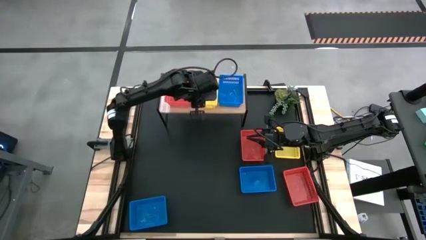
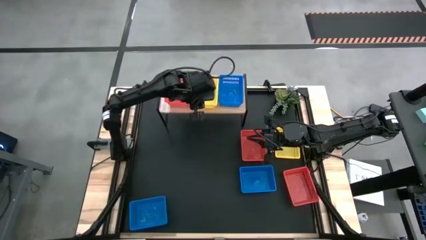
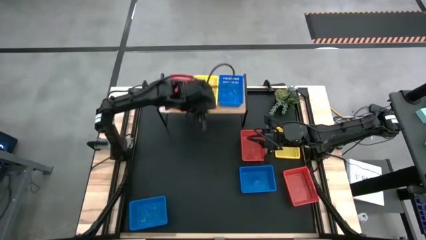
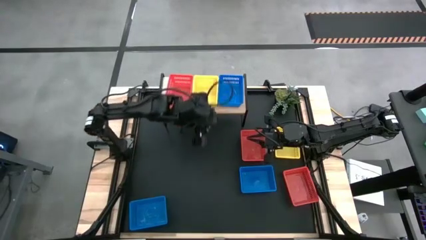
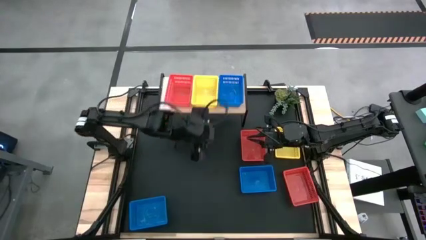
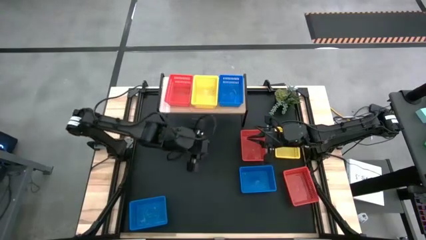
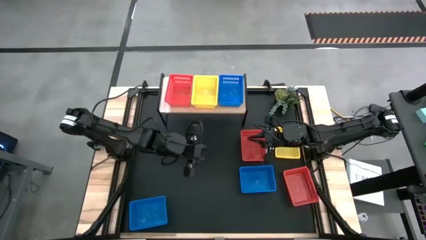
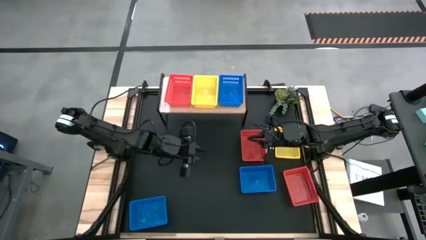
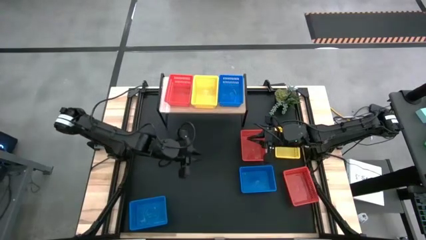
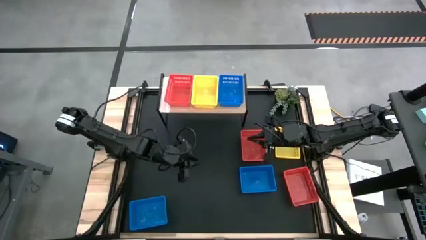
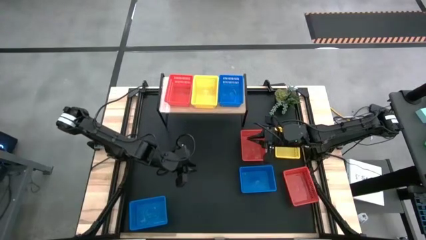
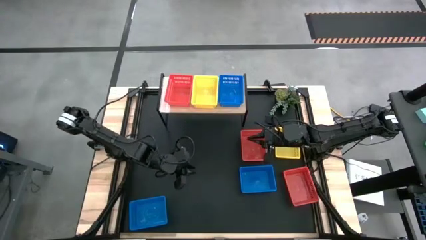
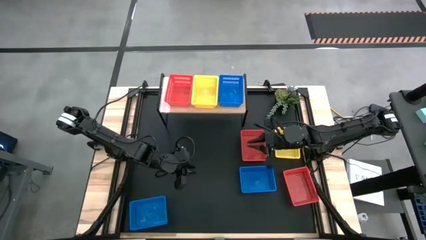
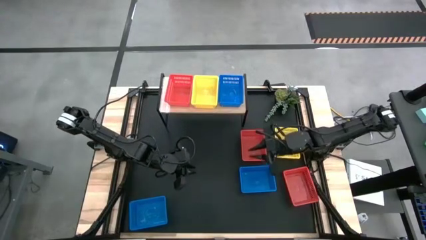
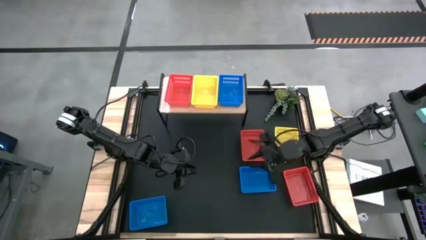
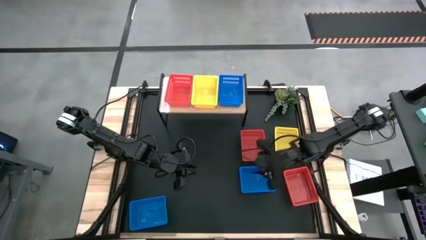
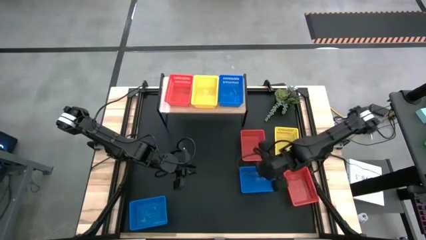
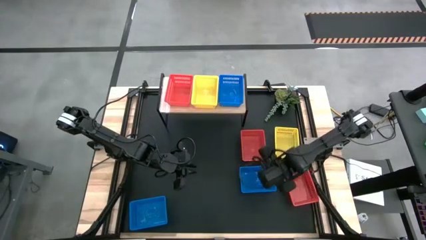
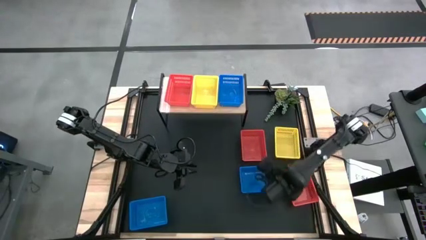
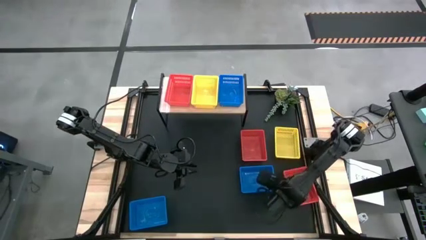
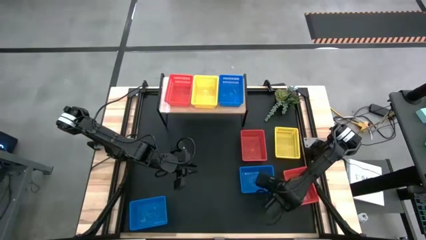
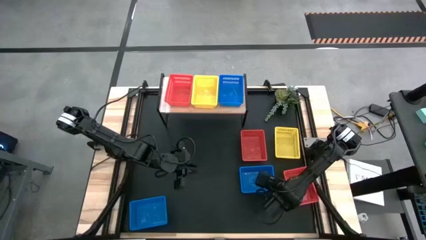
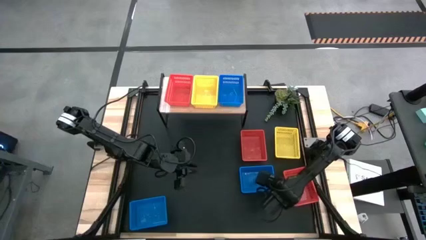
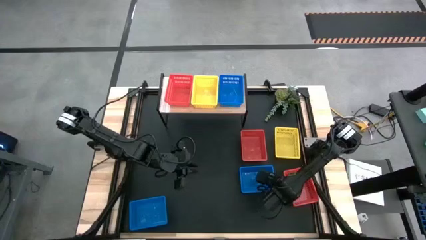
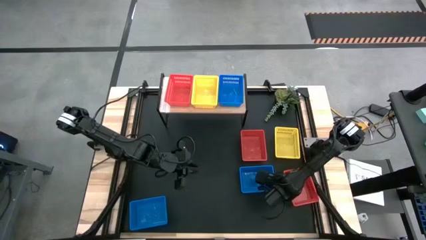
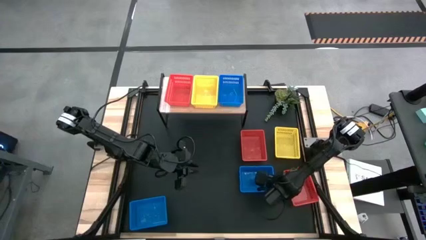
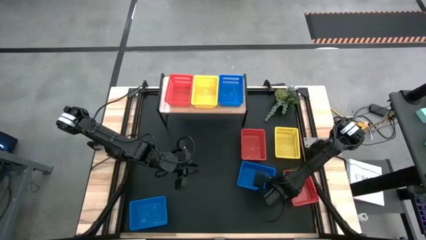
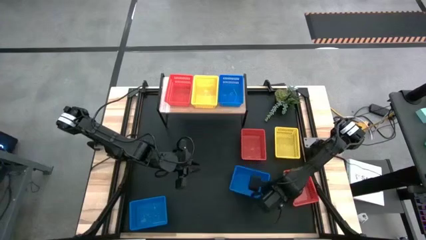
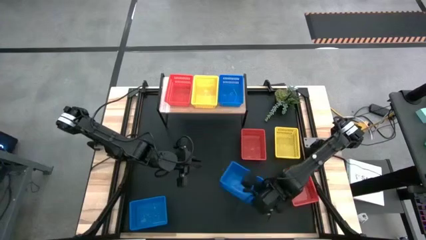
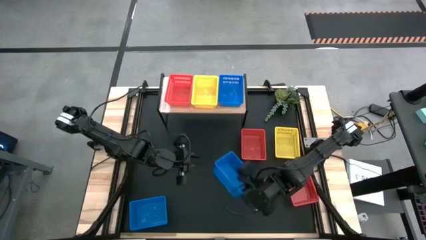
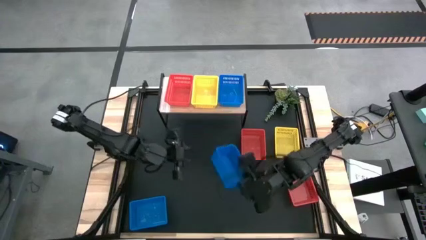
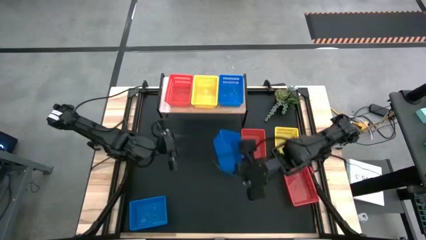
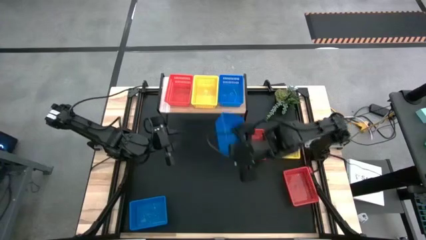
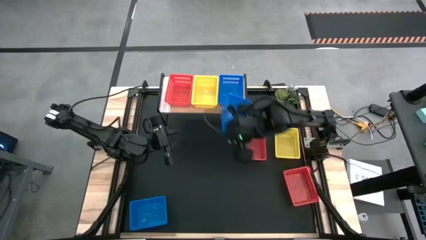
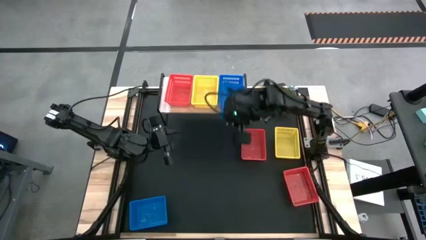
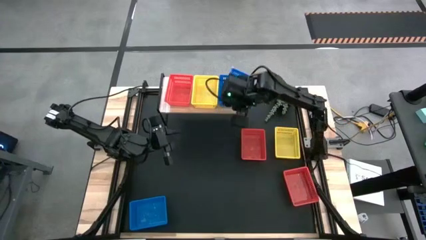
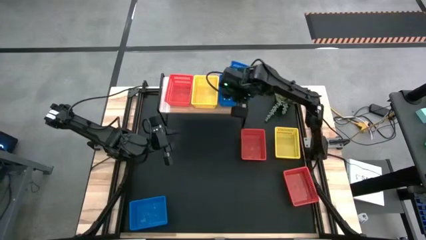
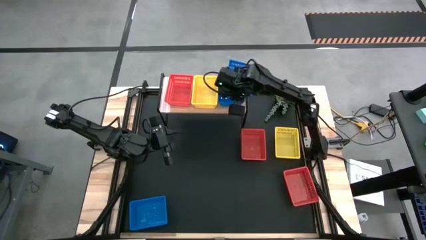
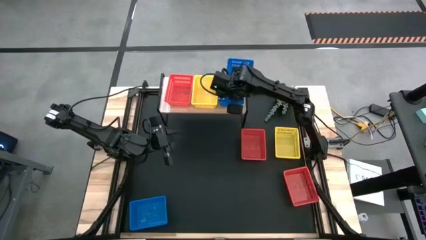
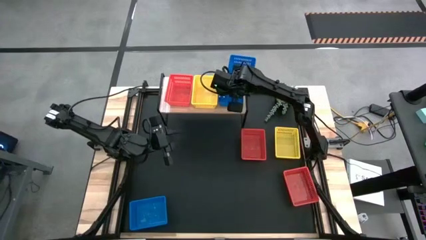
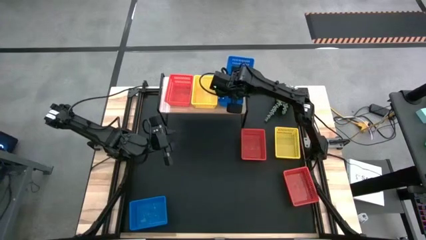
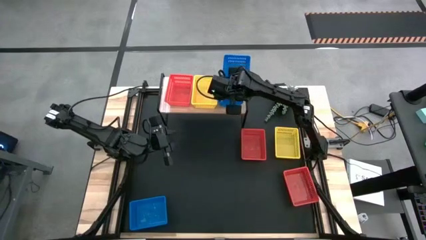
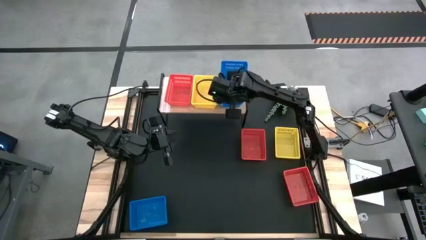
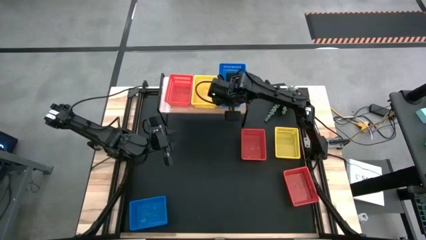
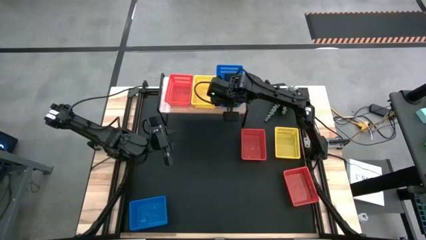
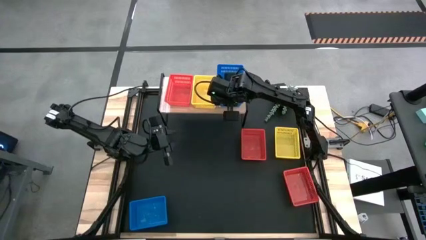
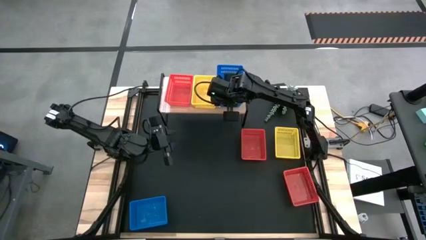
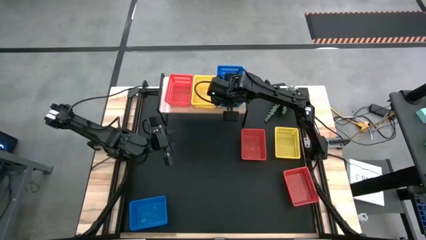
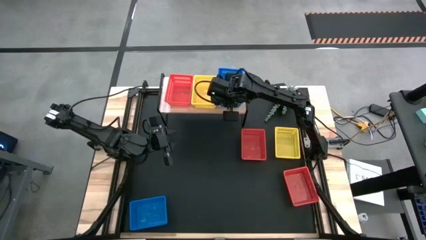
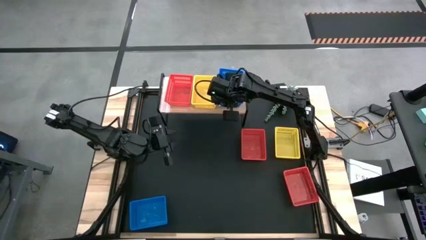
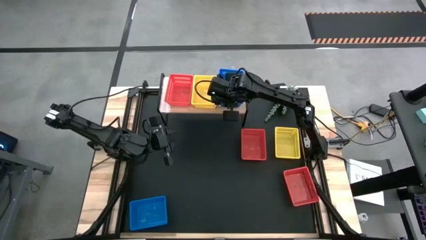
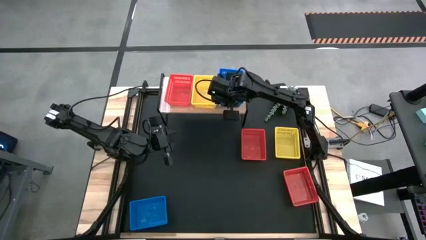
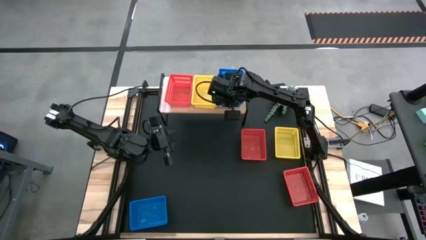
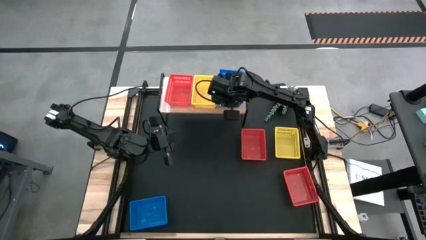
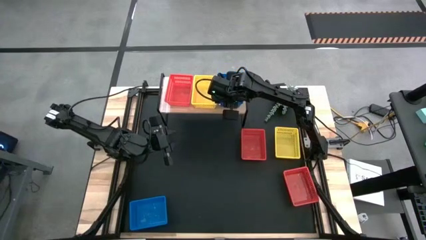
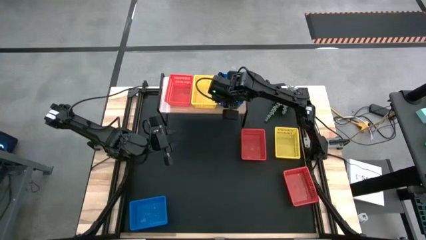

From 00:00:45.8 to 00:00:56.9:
Task: Stack baskets on shelf by color
Stack the right blue bin on top of the blue bin on the shelf

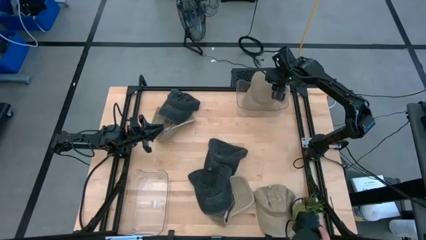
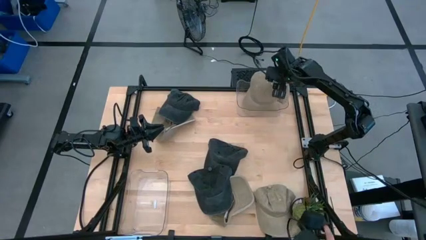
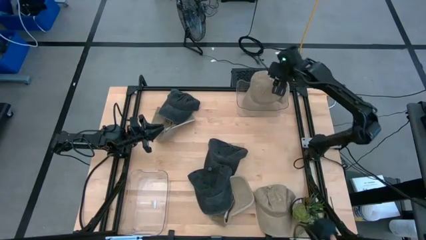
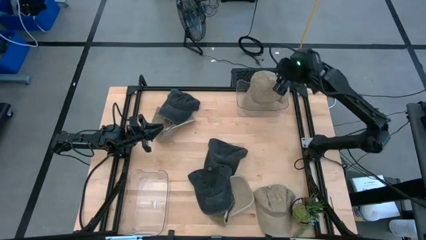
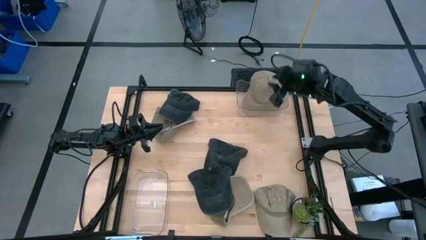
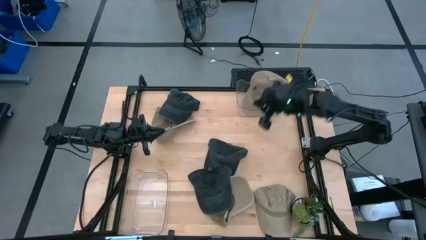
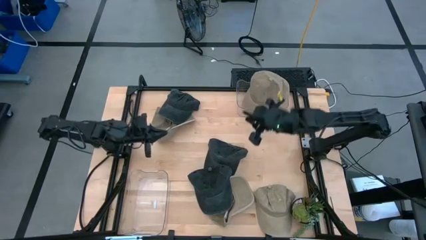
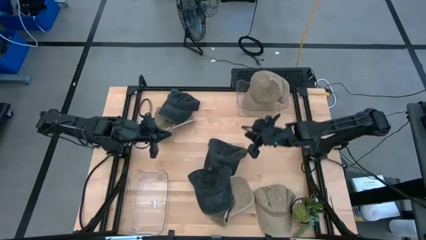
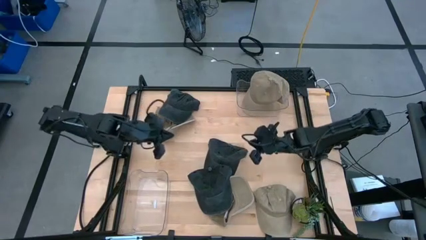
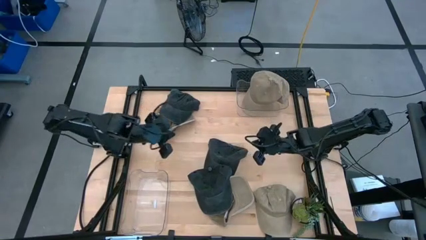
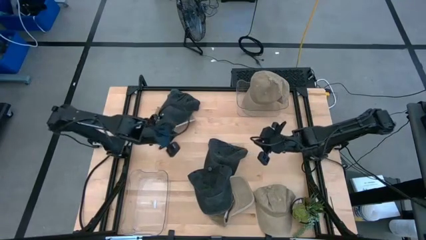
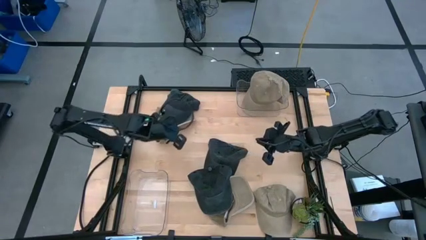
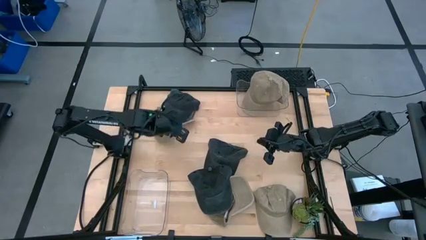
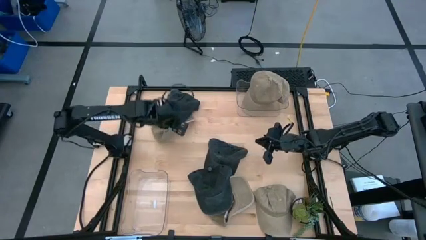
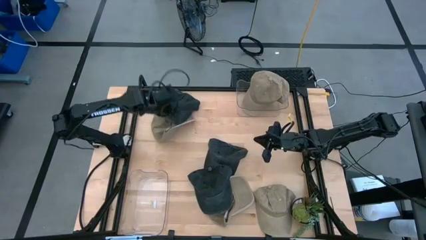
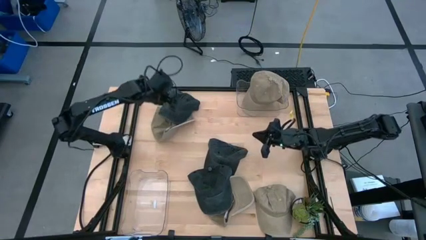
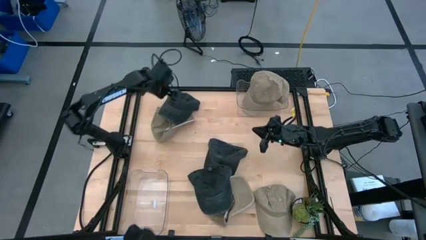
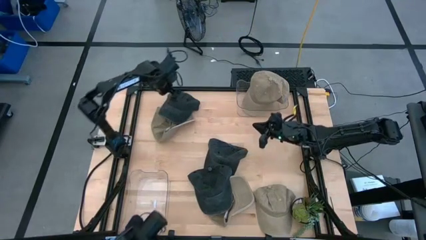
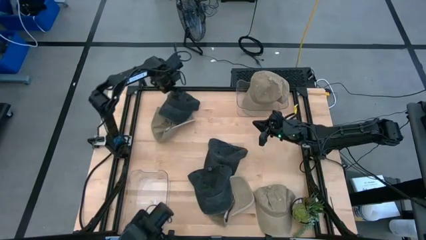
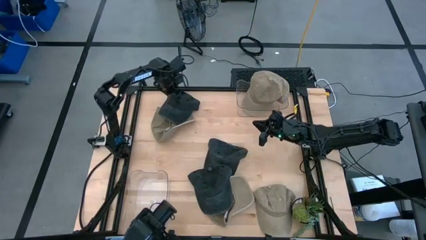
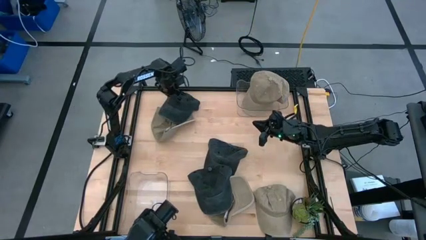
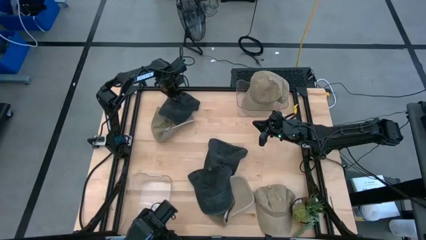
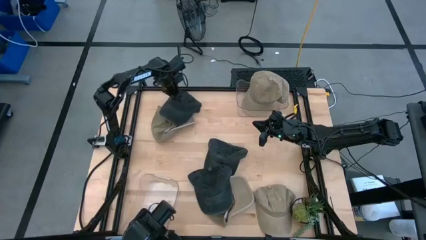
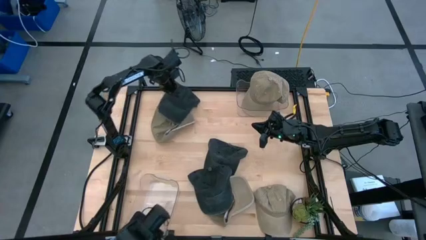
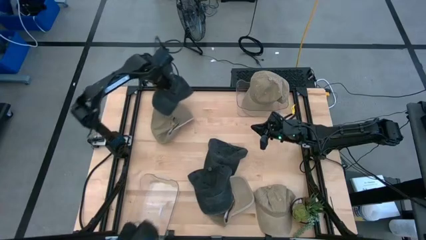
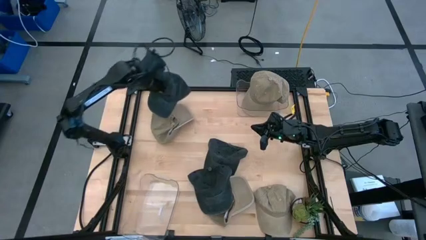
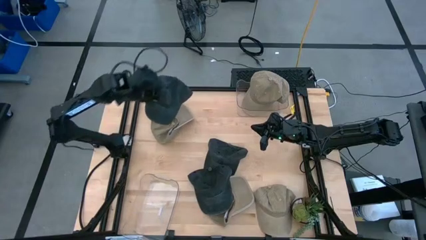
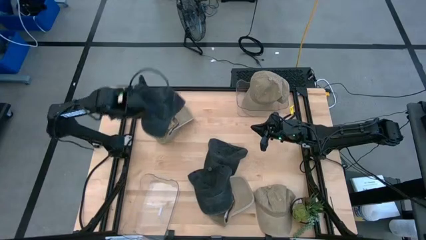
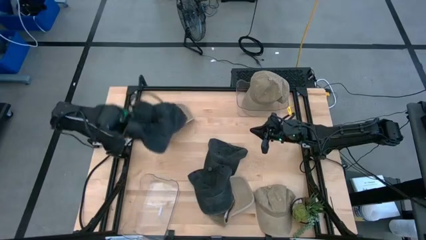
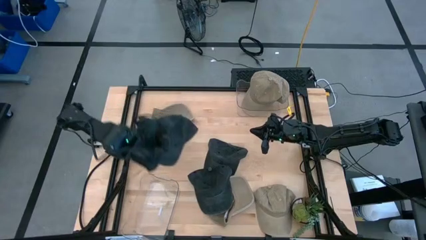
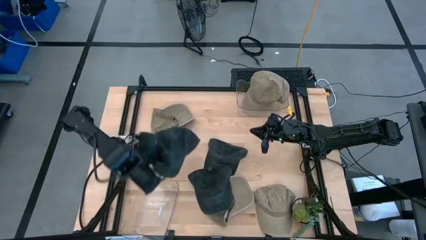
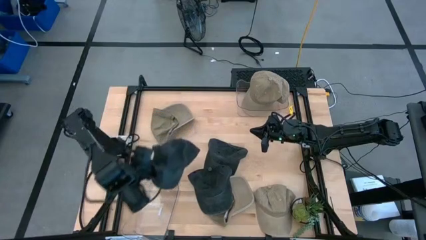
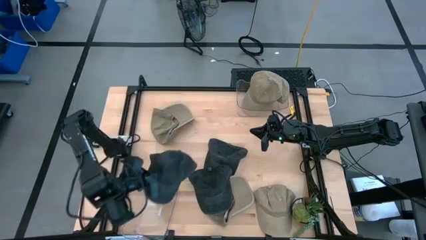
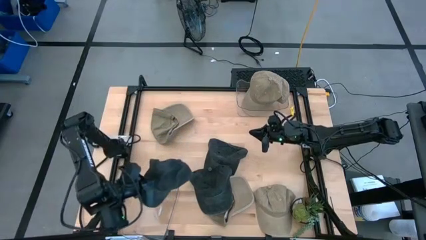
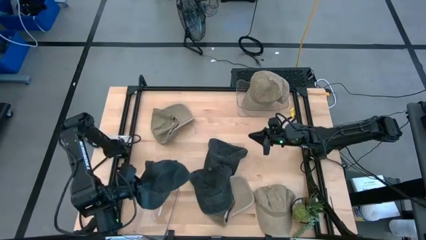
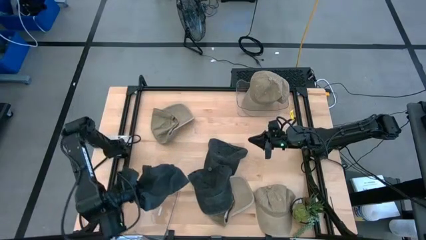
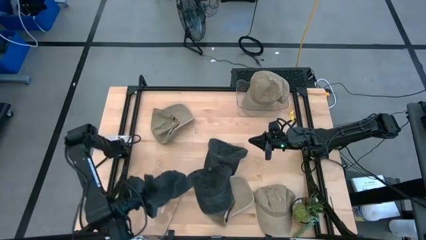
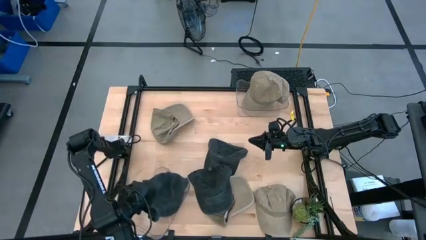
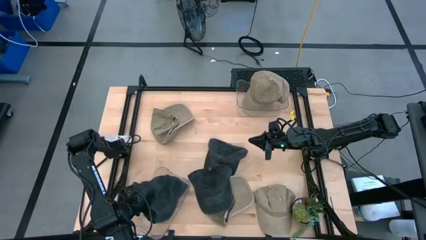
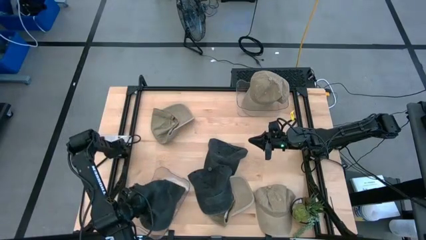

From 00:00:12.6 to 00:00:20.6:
Task: Pick & Place hat
Put the black cap into the bottom transparent bin
